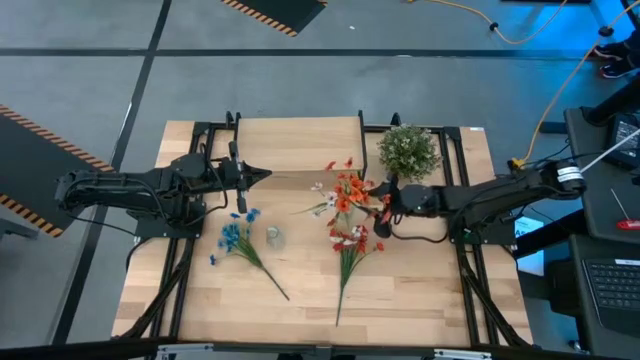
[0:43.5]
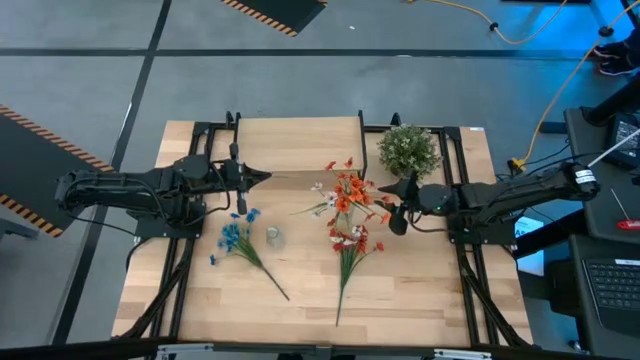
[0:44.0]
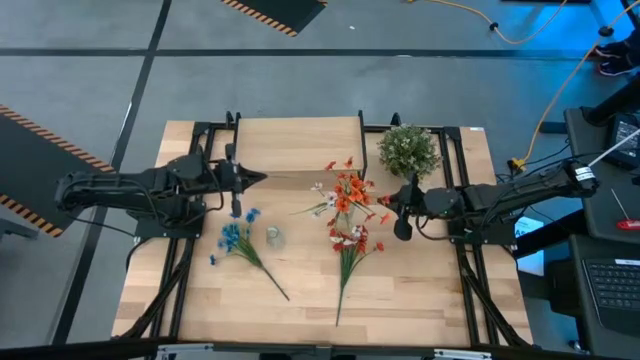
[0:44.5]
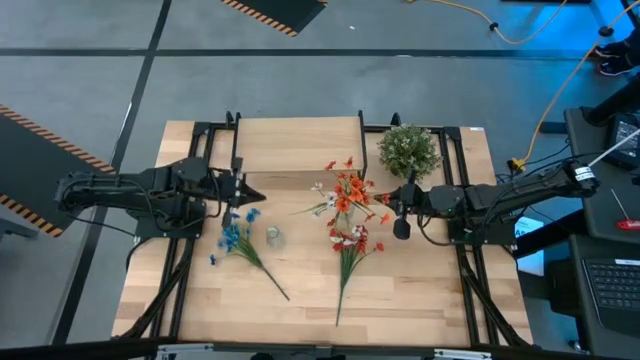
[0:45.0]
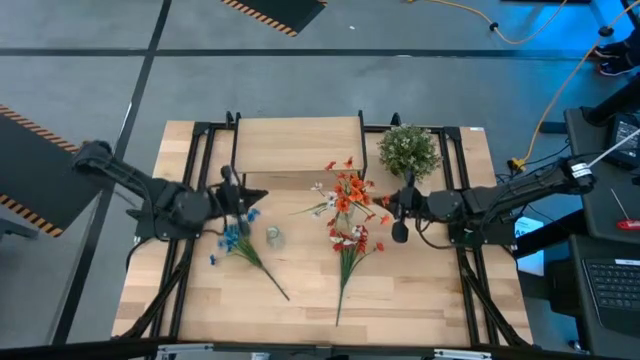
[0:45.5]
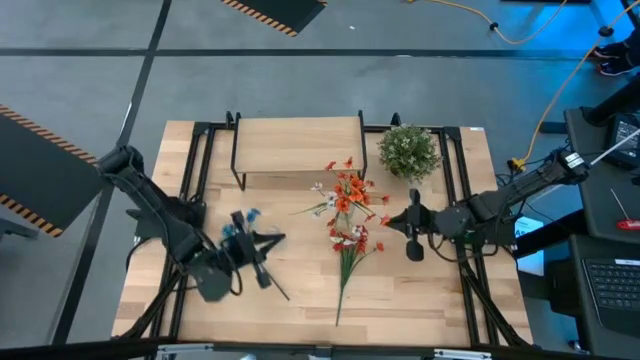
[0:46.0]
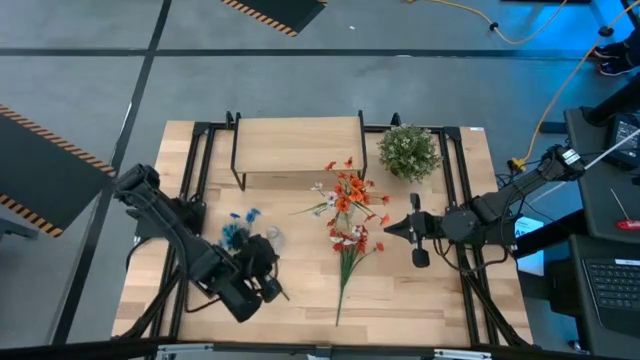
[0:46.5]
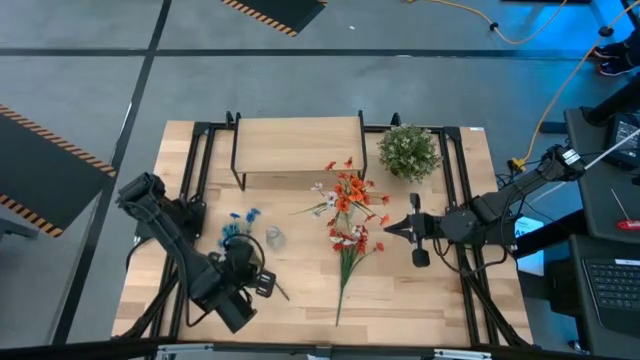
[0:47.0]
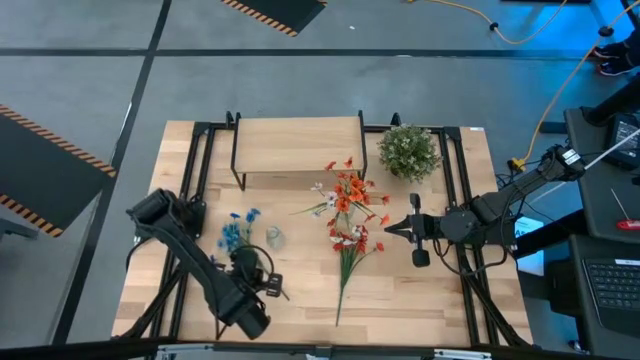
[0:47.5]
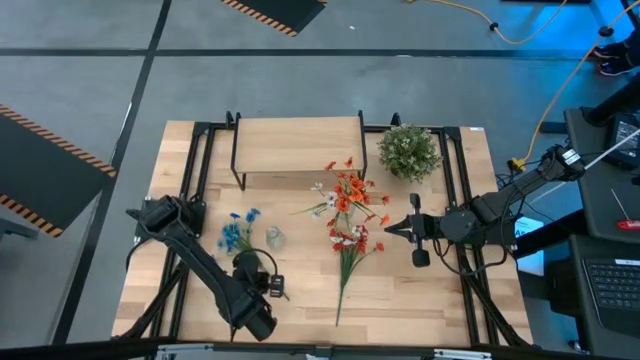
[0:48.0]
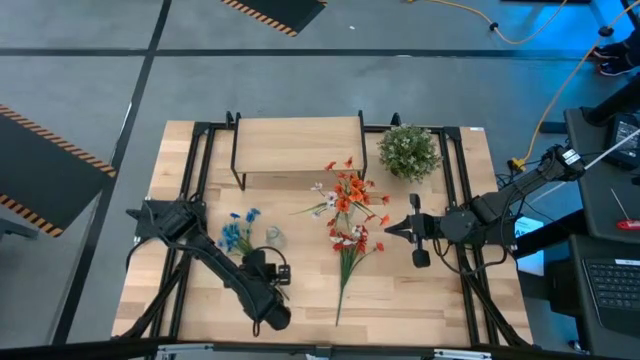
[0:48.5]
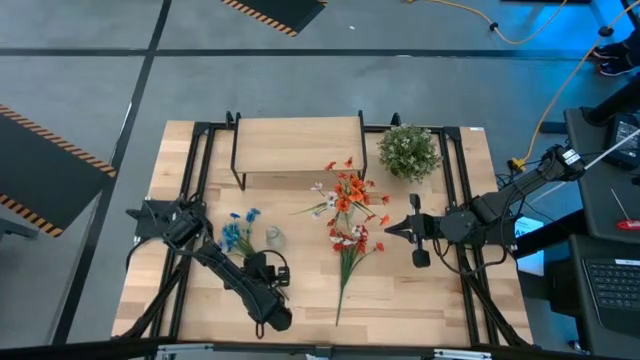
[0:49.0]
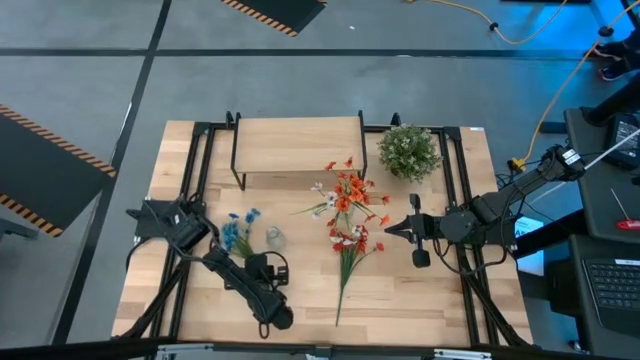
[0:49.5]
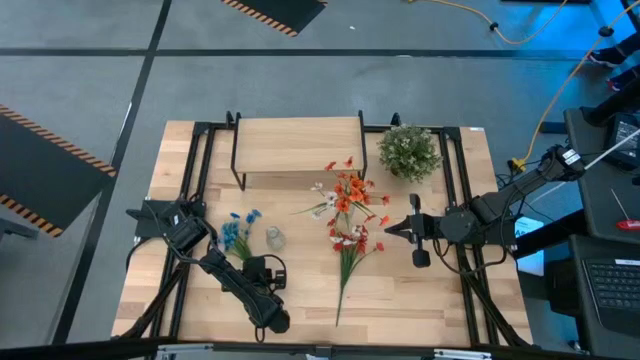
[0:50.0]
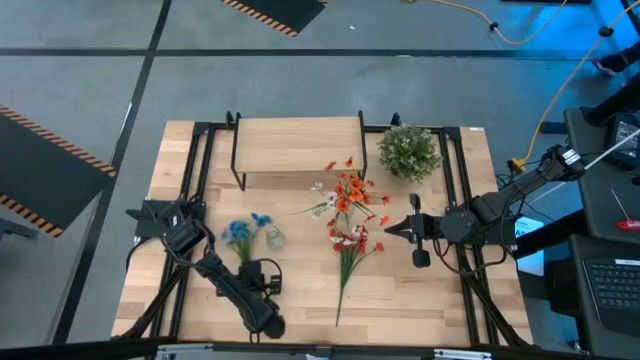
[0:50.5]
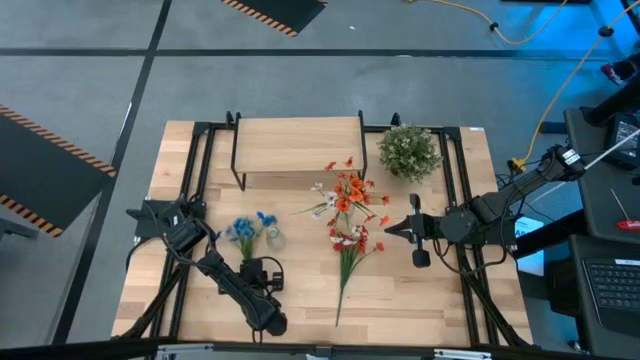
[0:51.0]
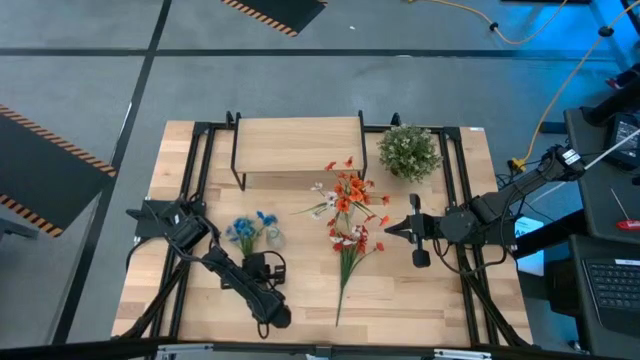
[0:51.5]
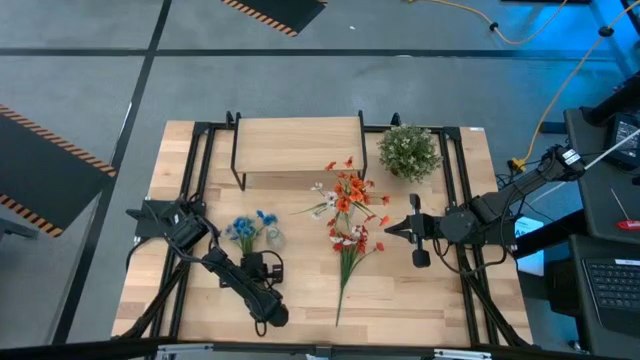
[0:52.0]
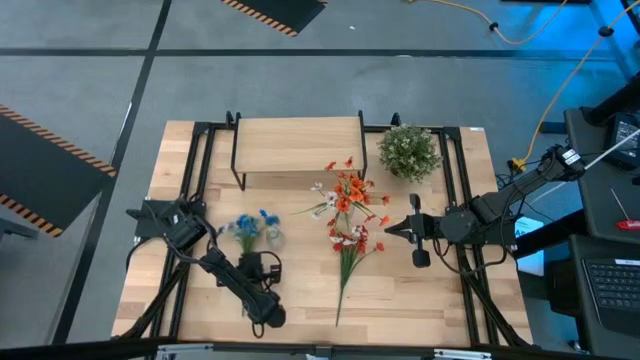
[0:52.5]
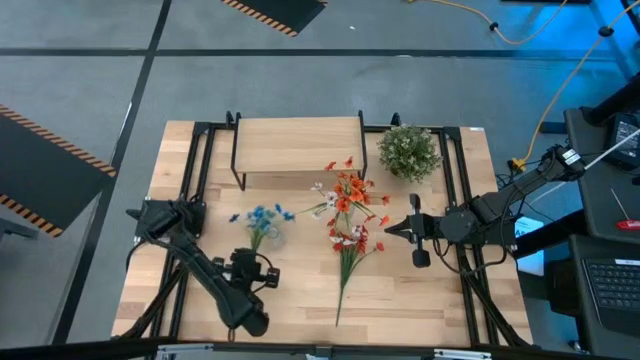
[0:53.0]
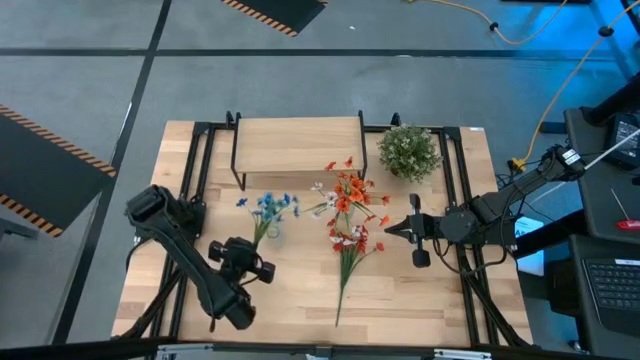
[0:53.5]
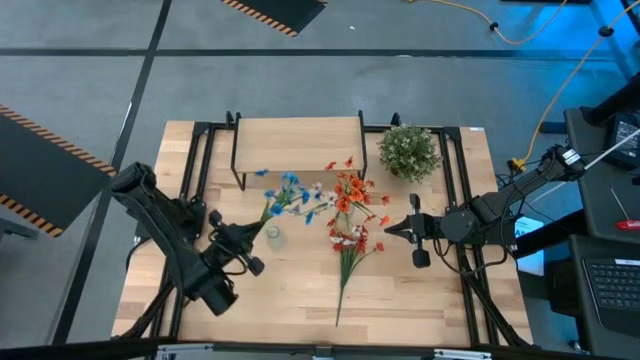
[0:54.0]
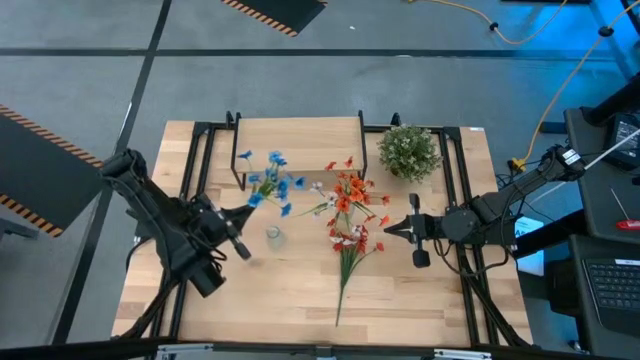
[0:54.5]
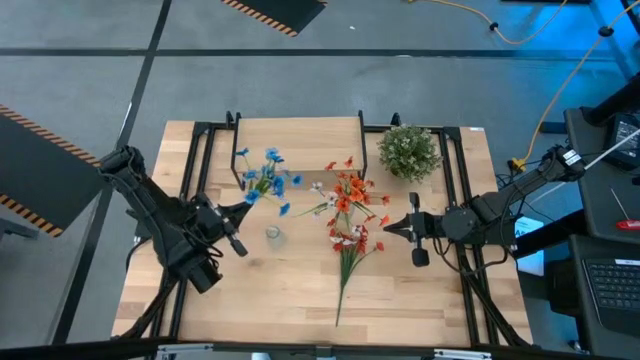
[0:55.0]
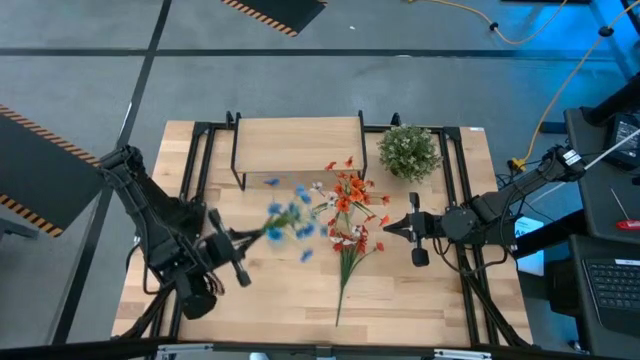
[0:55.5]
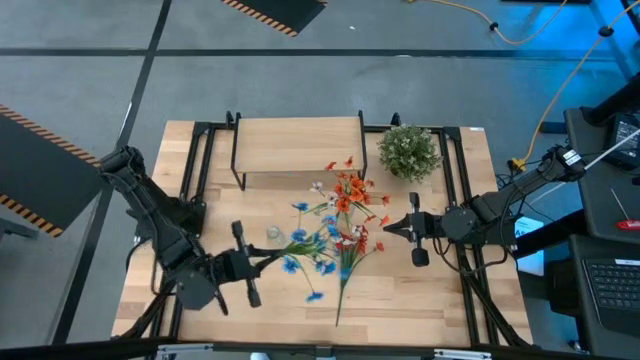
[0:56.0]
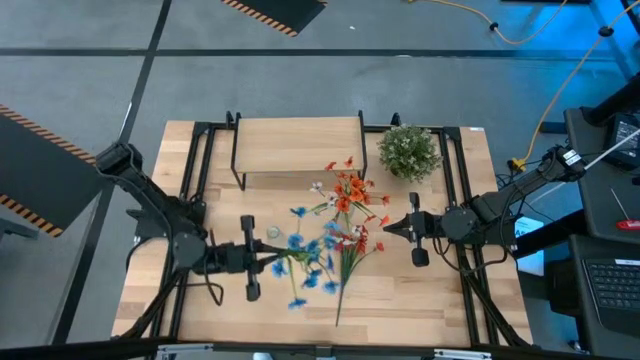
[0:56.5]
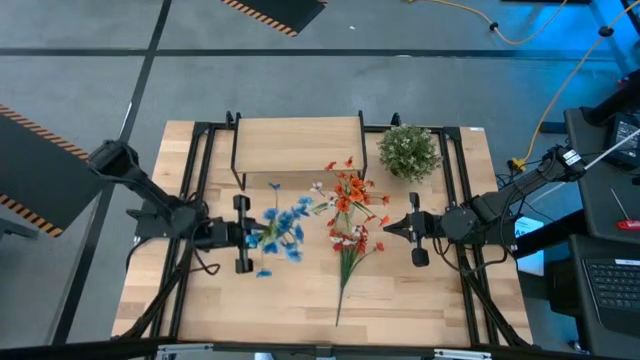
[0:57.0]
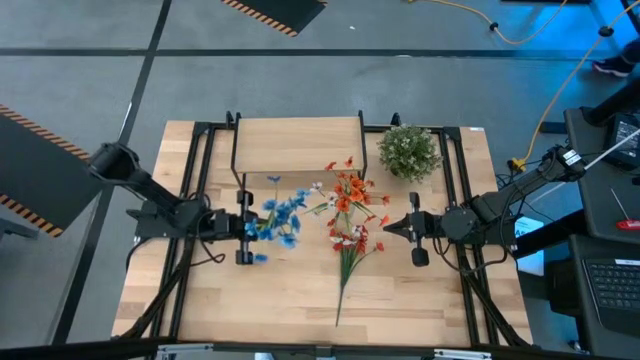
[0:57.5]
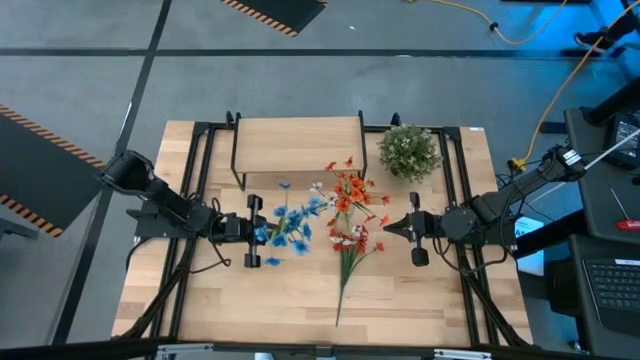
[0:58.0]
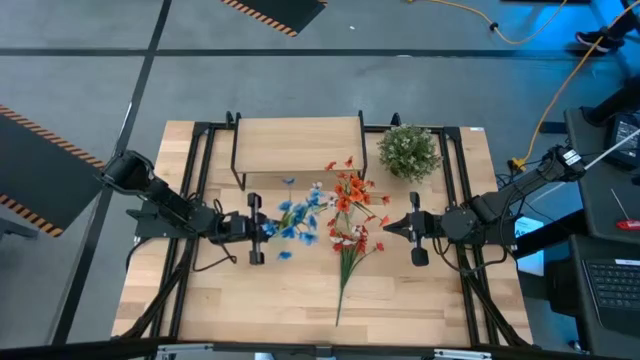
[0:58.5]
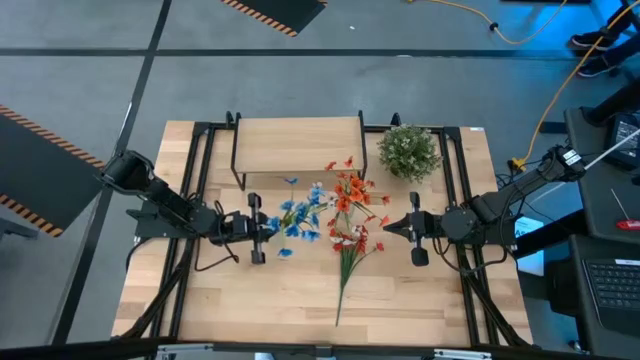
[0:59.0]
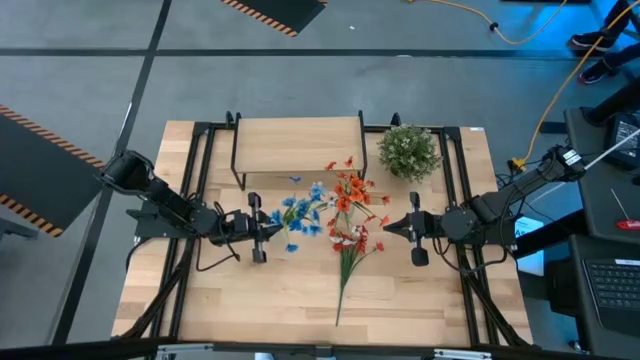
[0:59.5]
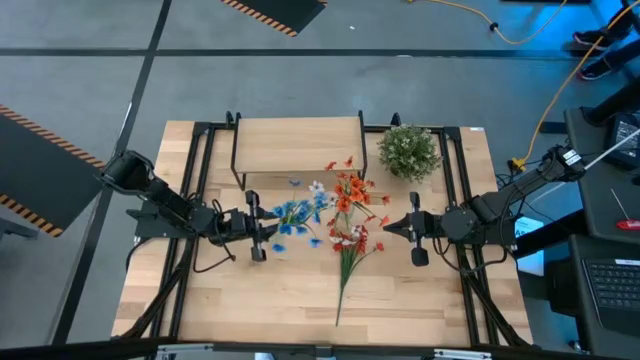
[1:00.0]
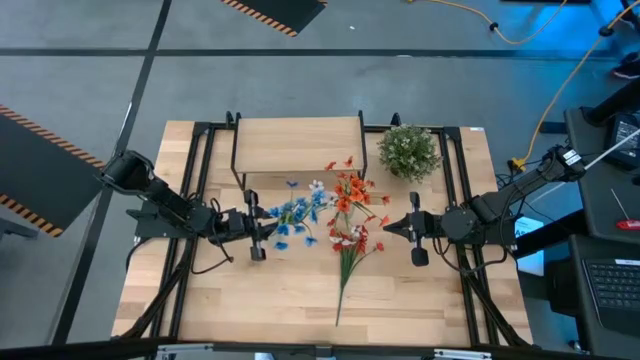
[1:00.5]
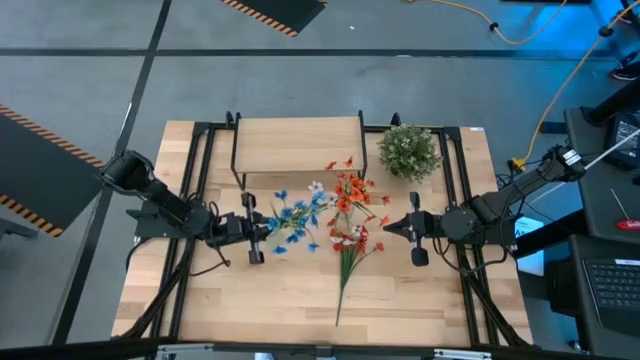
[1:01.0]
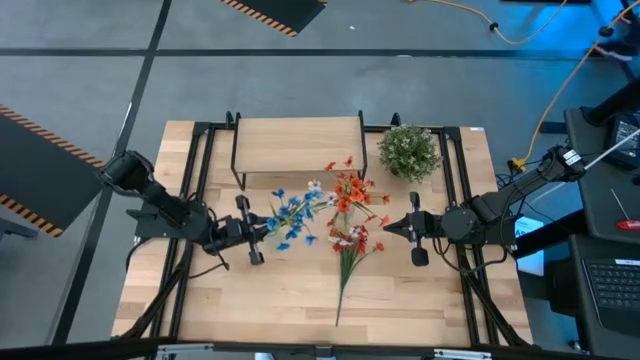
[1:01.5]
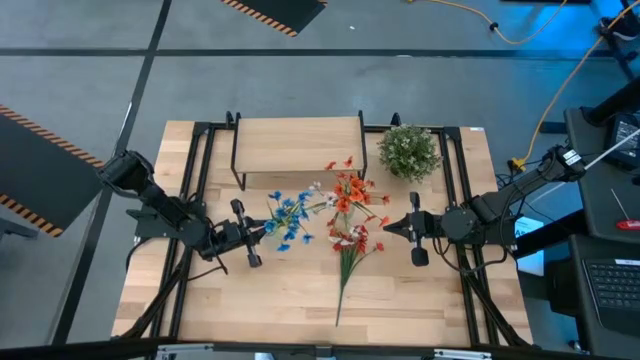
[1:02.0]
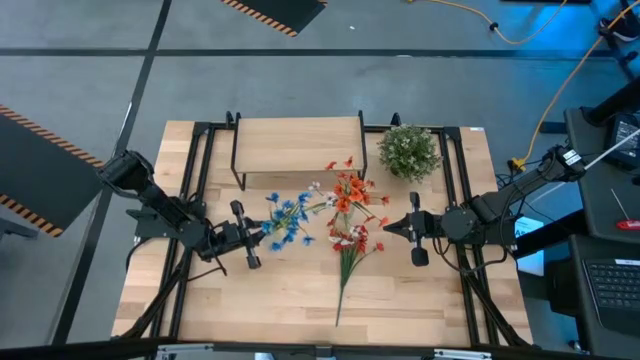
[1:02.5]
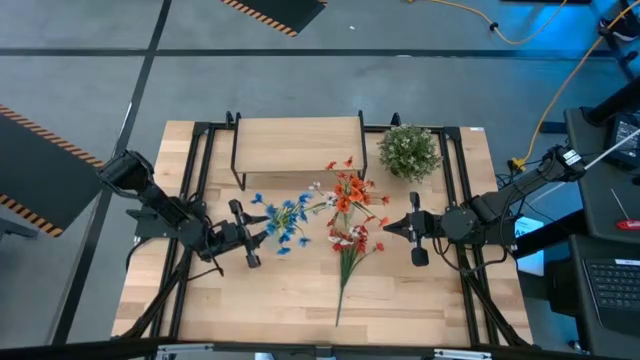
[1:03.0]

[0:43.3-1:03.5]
Task: Pick and place flowers into a vace then onto a shelf
Put the blue flowers into the left transparent vase
